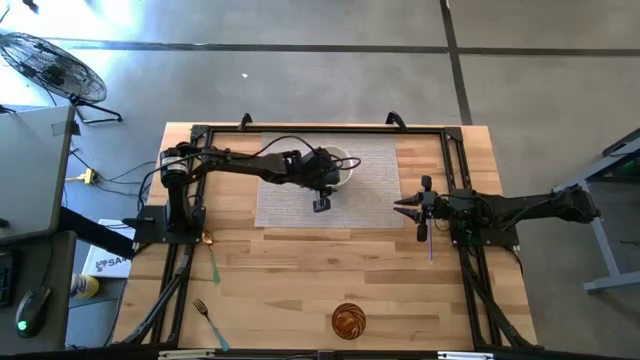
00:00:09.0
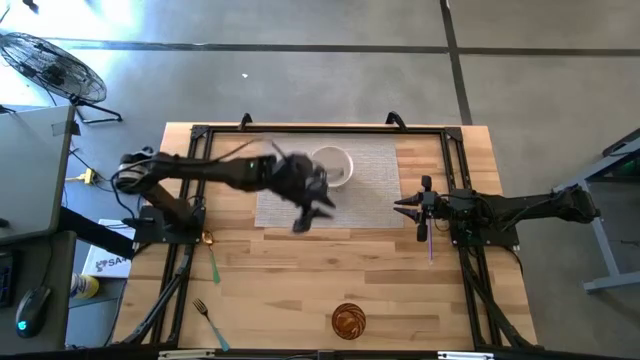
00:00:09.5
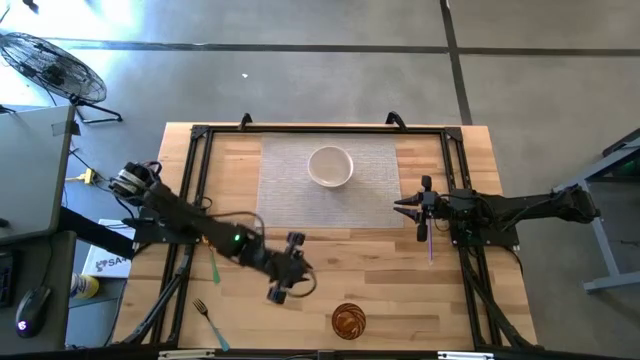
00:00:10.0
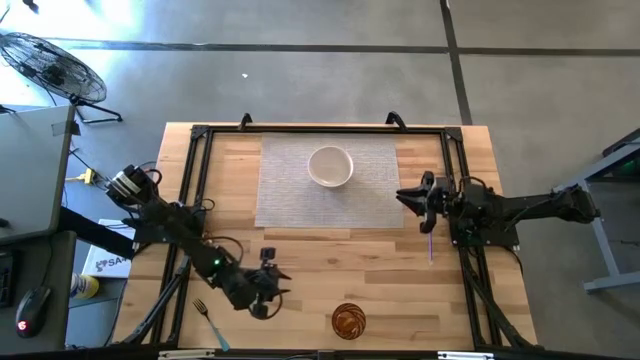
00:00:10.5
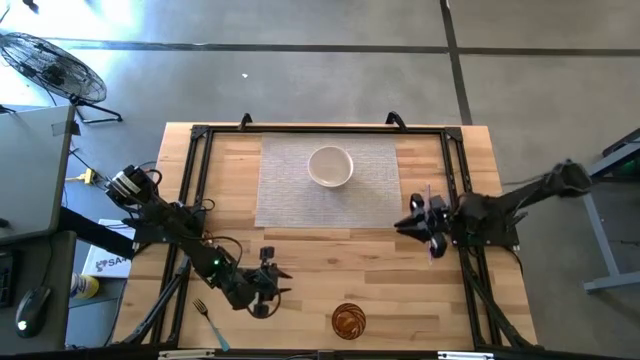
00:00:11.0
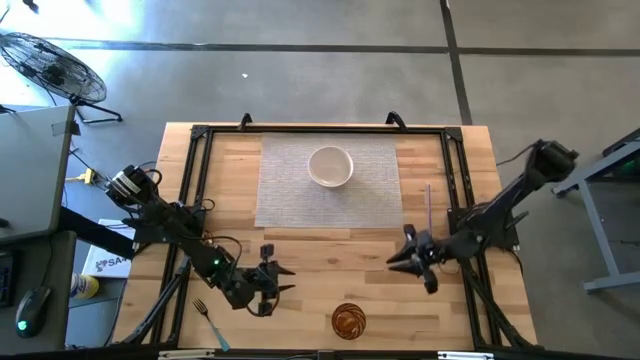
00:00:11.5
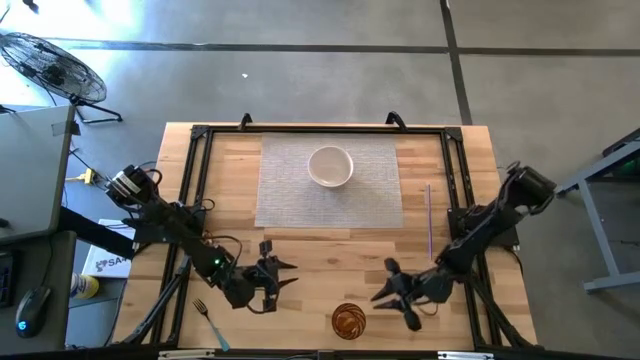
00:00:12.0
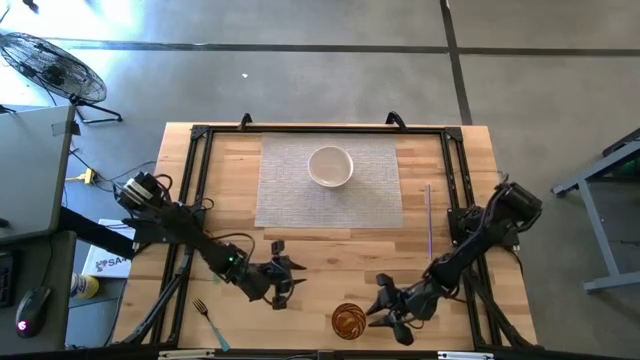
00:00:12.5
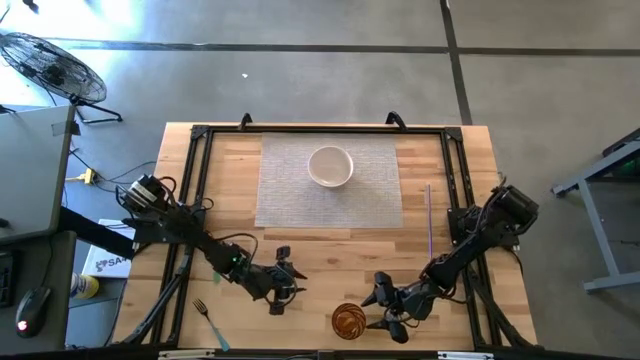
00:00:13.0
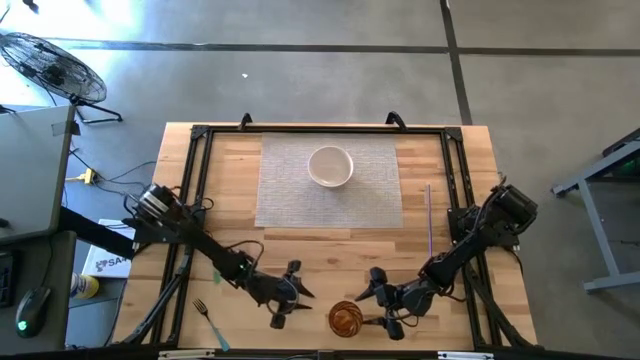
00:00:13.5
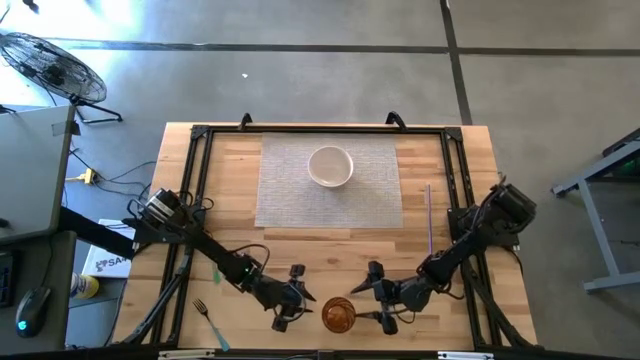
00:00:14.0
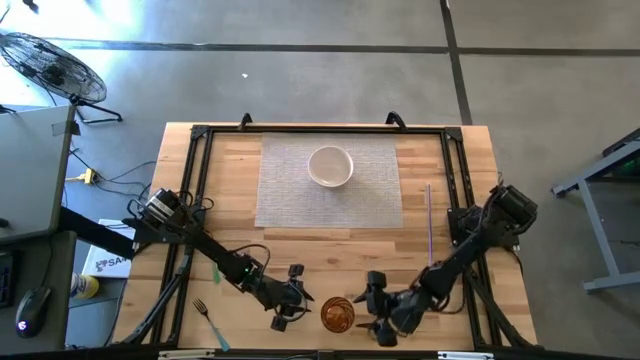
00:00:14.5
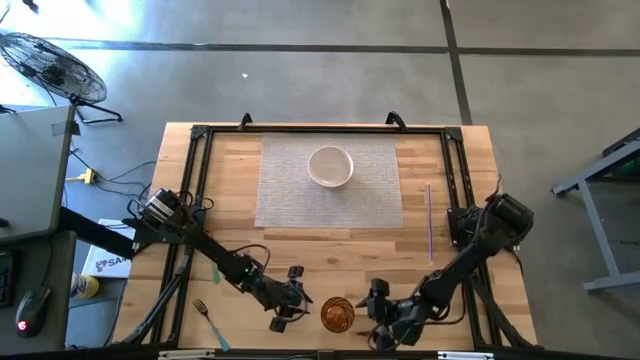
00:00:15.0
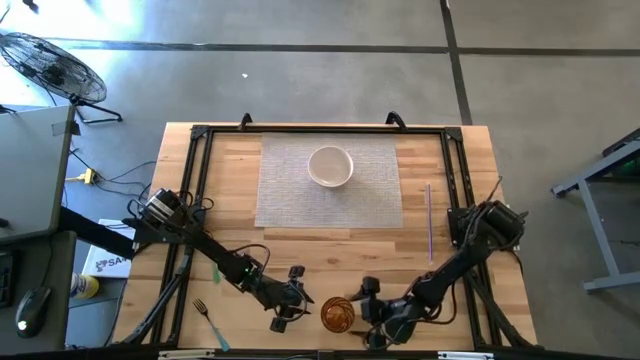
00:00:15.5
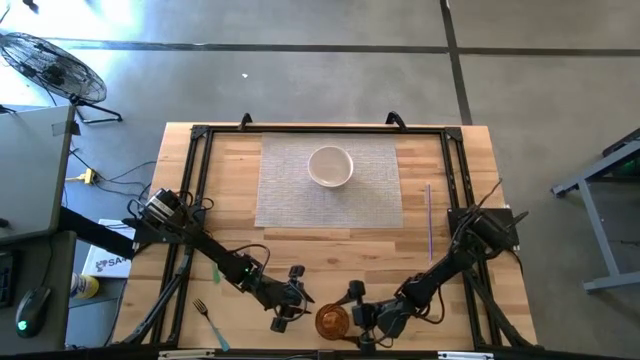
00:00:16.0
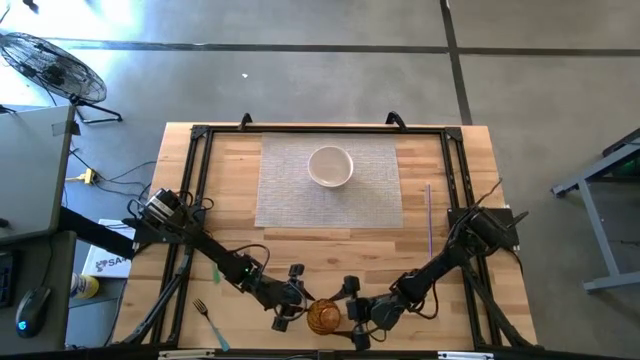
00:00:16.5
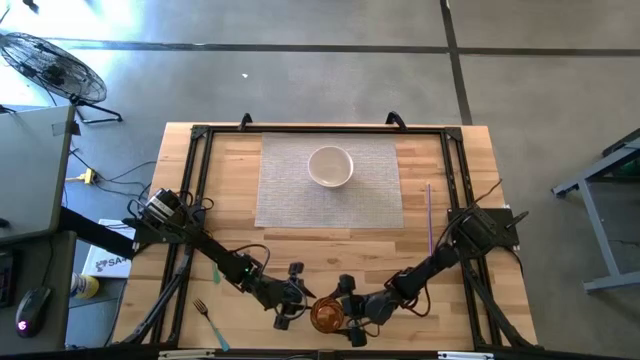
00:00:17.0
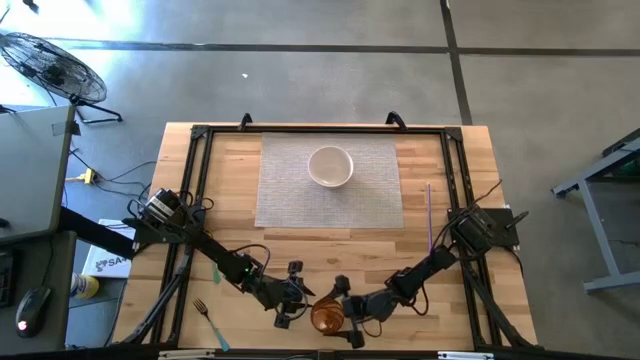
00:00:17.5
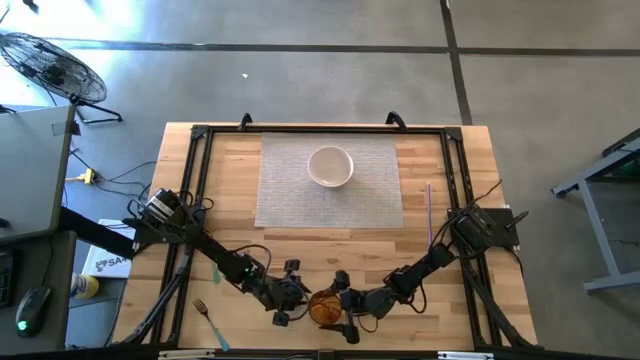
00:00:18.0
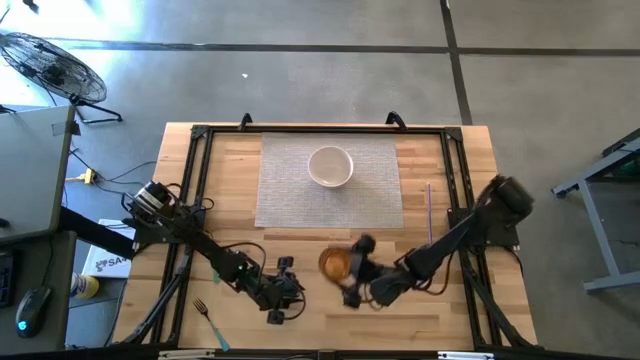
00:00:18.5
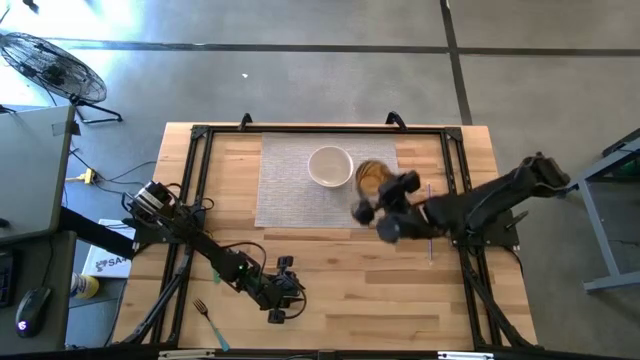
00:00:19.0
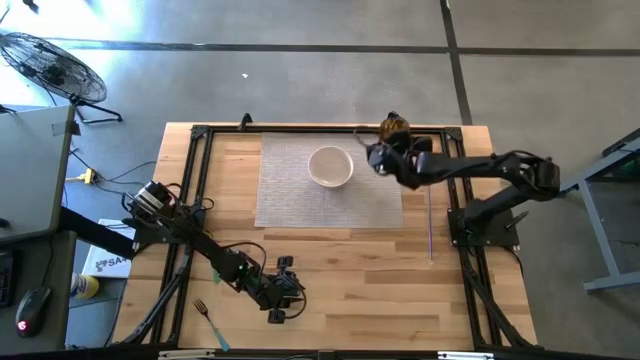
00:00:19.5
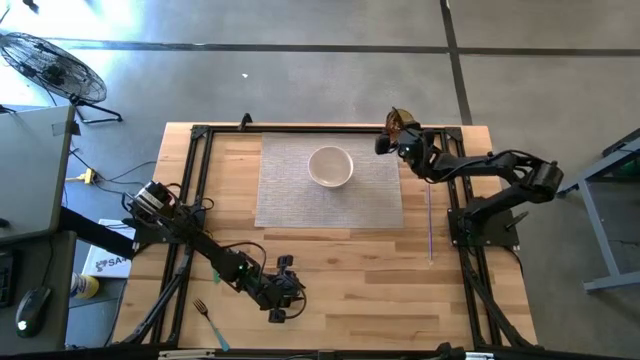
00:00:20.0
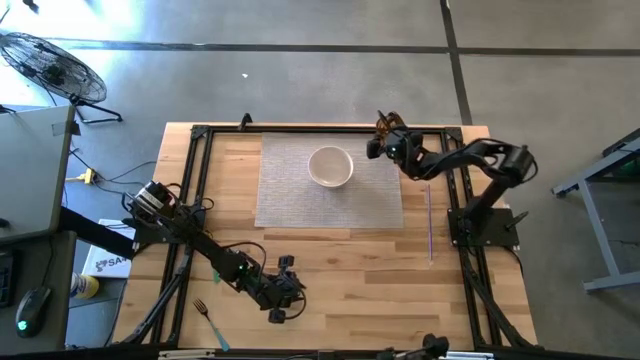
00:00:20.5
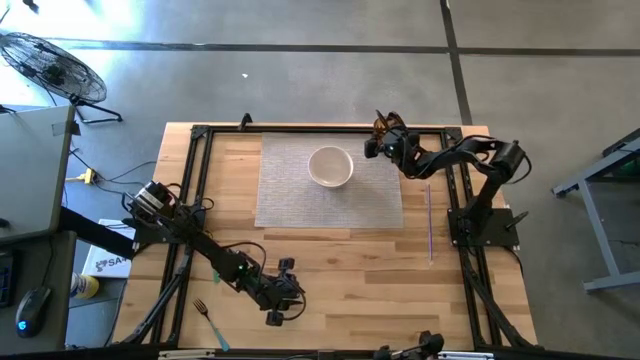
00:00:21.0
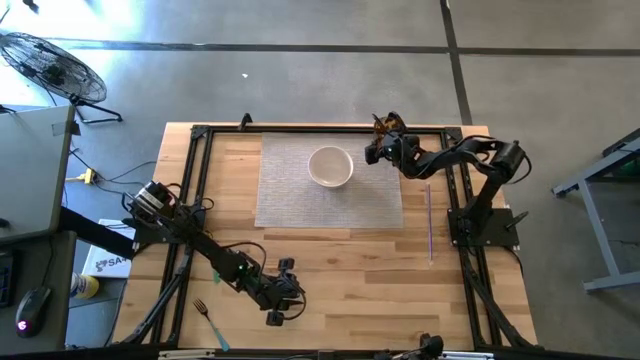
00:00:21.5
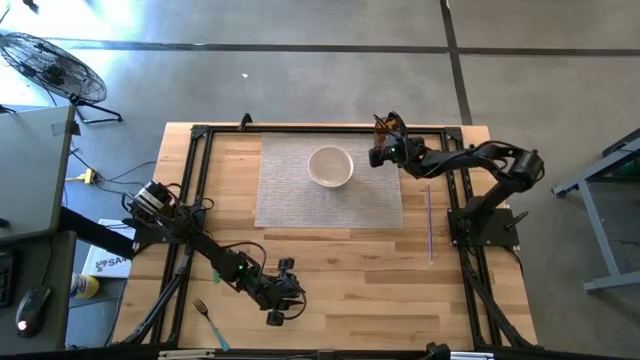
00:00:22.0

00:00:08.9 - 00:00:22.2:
Task: Pick & Place Utensil
Put the brown glass on the top right of the gray mat

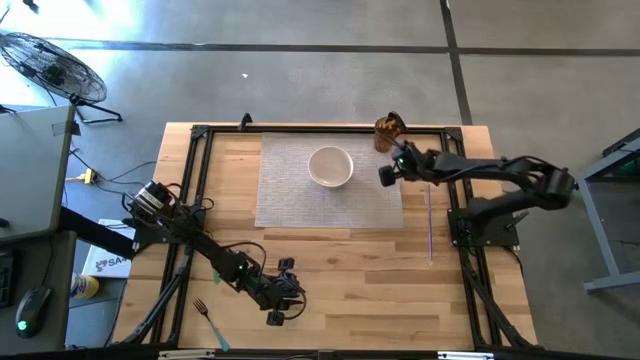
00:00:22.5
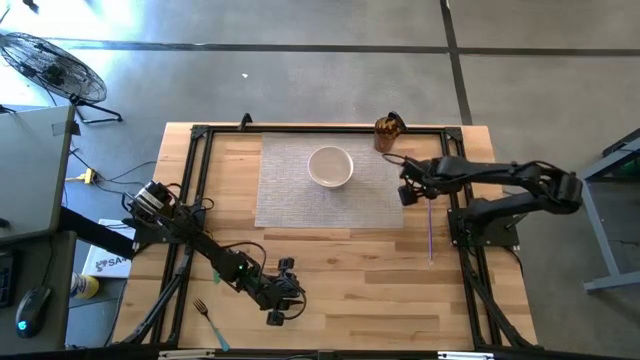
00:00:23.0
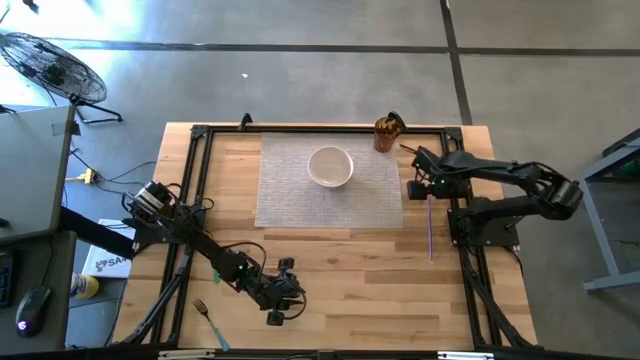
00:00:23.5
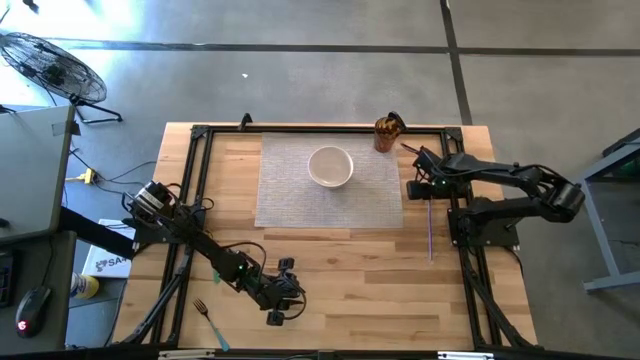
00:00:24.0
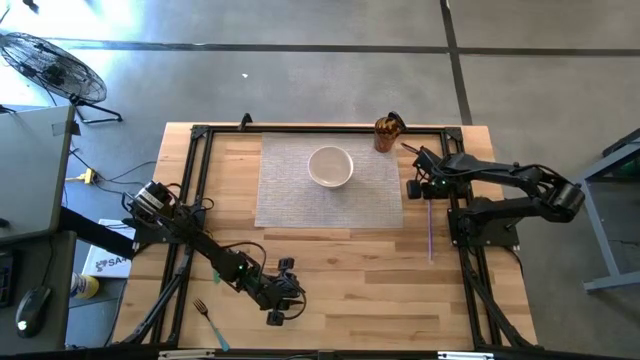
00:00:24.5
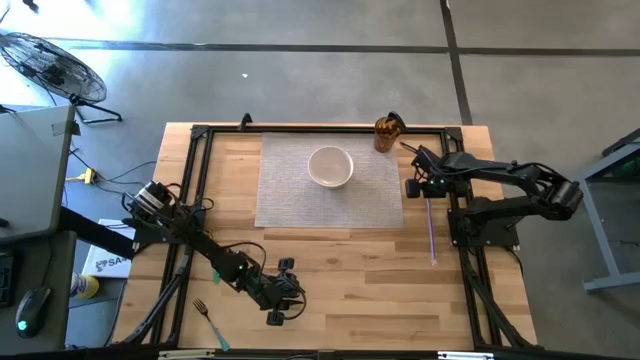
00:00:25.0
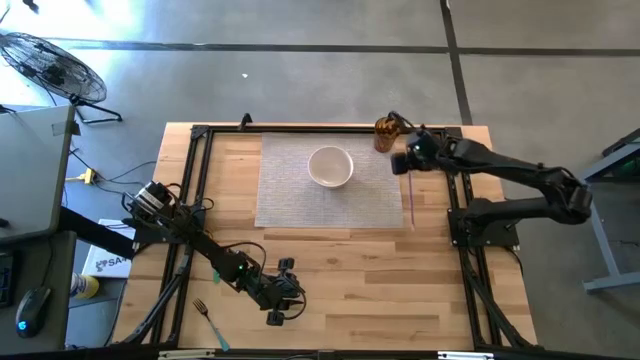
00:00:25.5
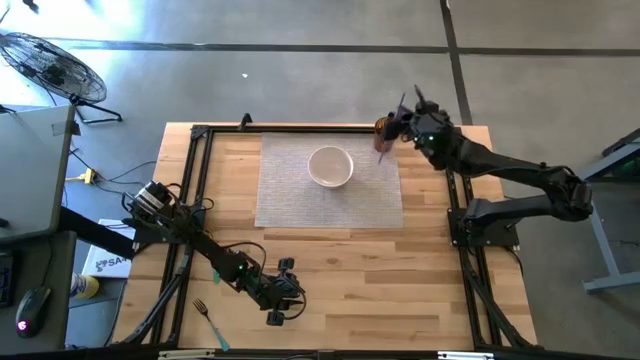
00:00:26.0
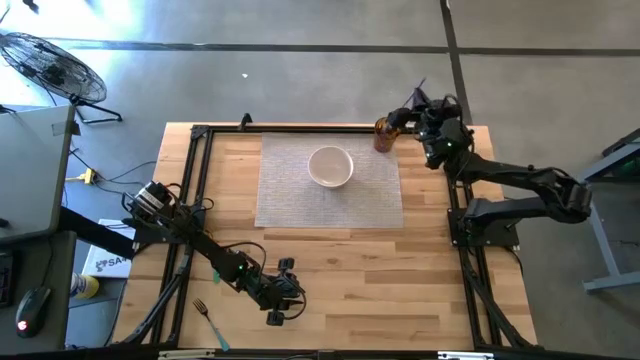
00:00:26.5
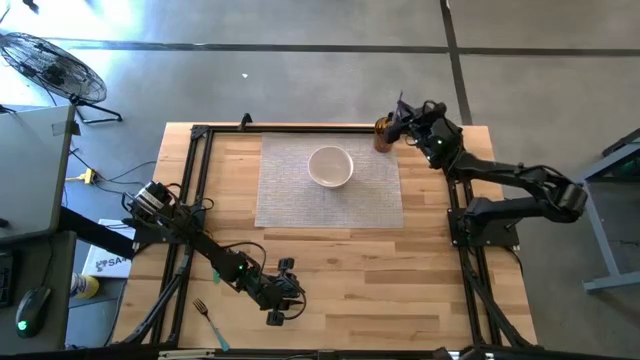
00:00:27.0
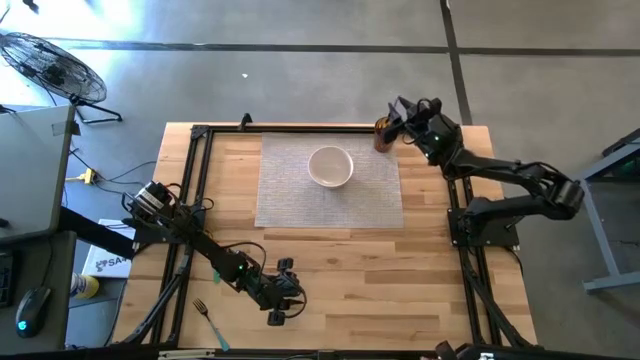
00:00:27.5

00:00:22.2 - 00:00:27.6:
Put the purple drinking straw into the brown glass

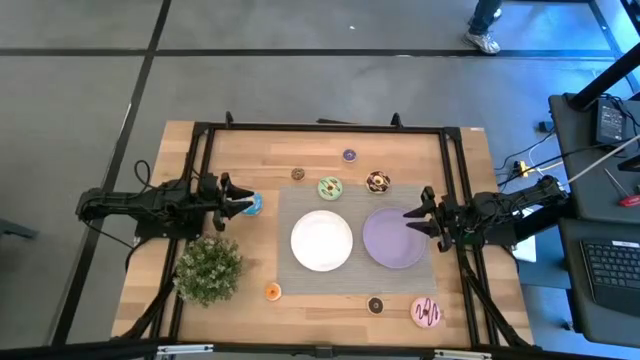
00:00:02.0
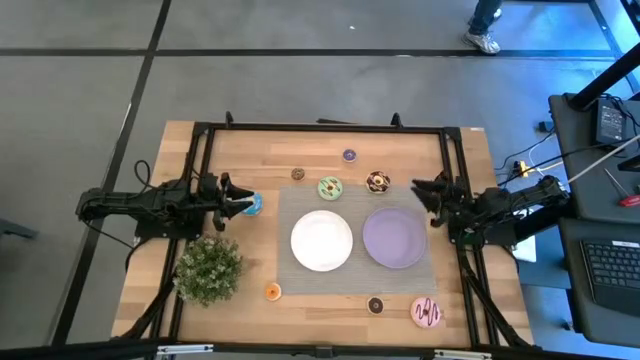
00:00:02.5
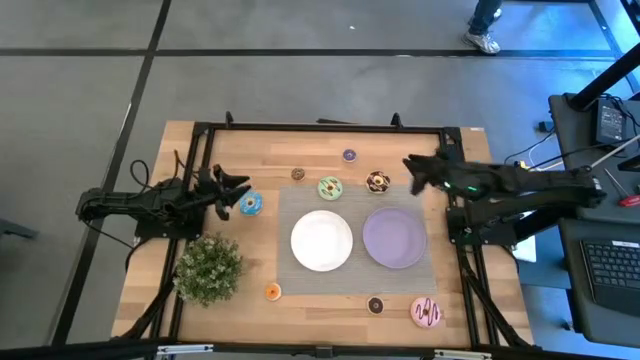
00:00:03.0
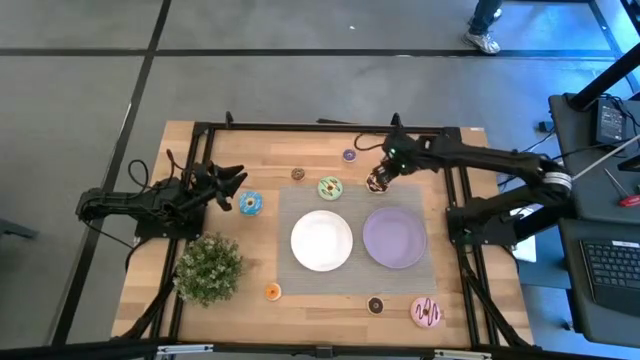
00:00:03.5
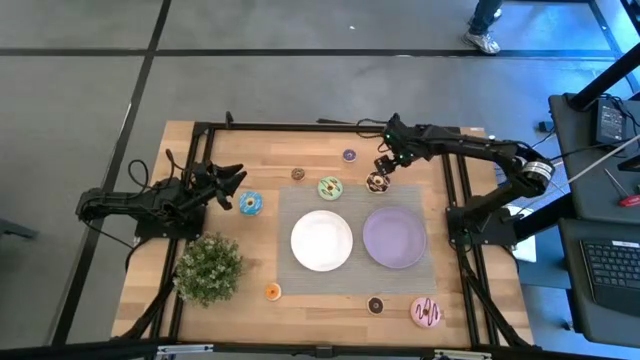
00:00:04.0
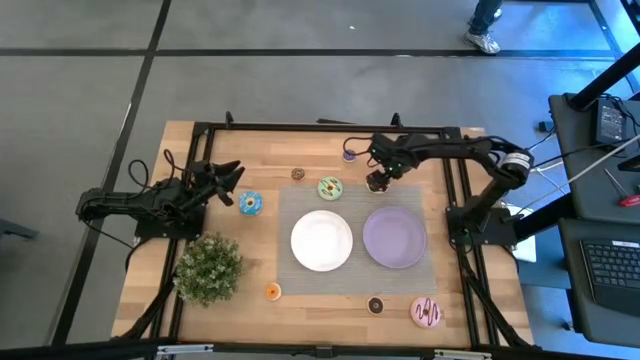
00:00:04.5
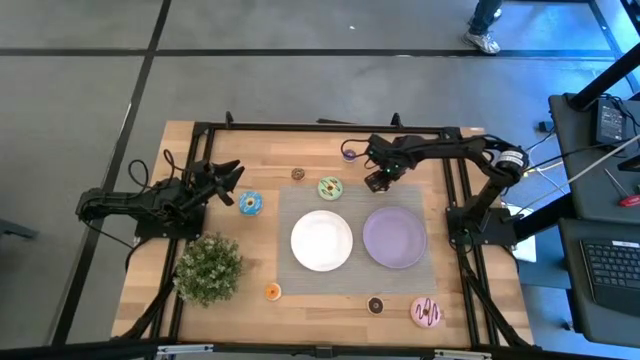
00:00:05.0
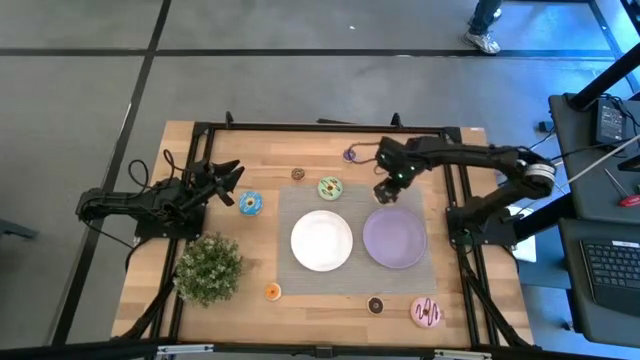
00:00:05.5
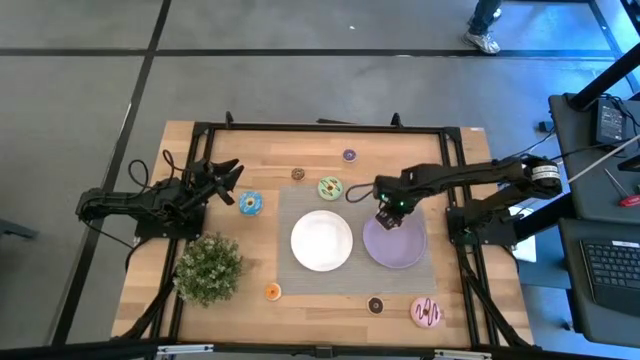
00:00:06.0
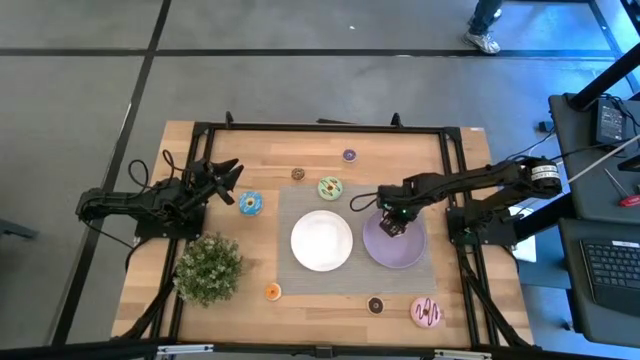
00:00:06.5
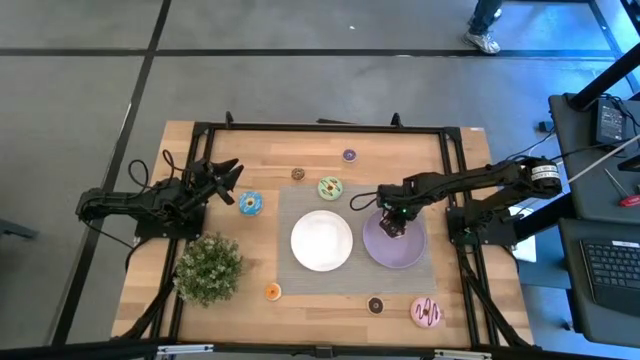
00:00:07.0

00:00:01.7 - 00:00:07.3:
Task: Pick & Place donuts
Put the large black donut on the purple plate
